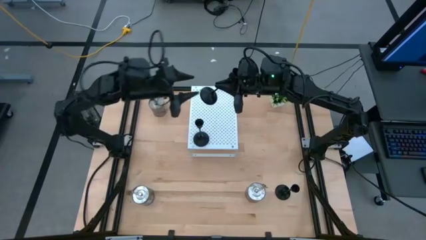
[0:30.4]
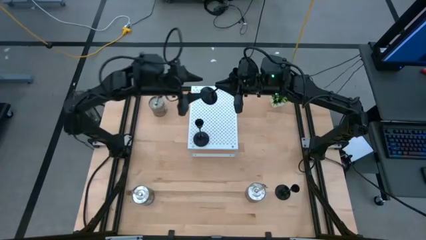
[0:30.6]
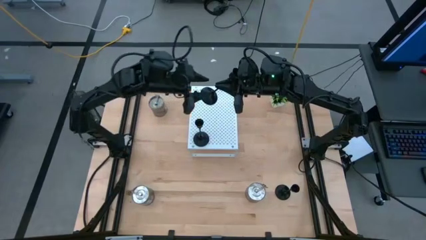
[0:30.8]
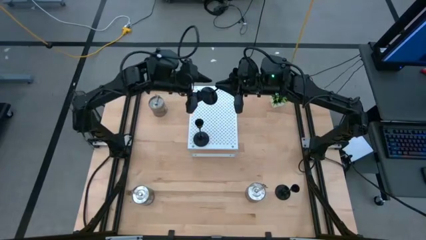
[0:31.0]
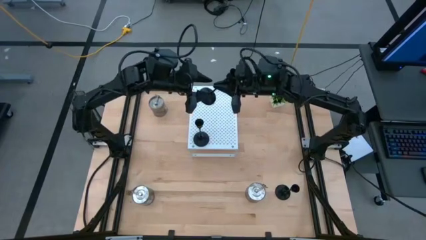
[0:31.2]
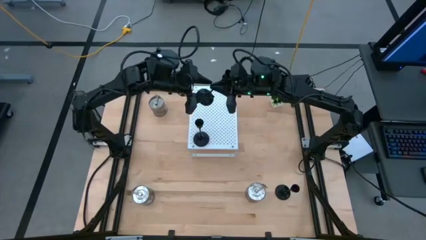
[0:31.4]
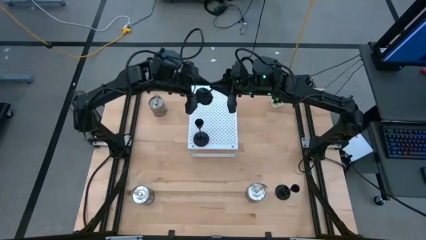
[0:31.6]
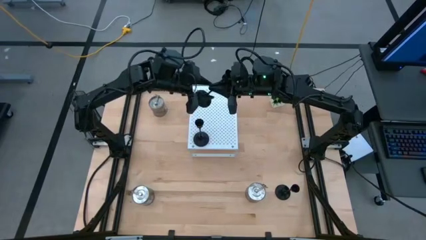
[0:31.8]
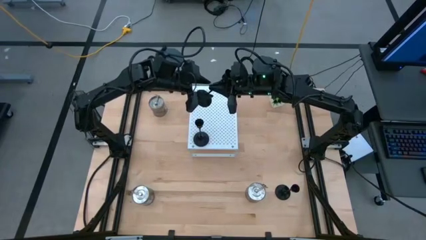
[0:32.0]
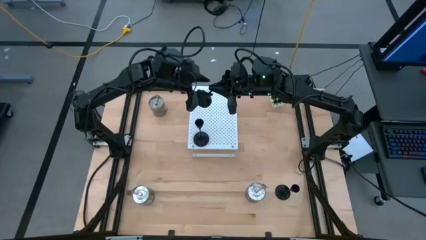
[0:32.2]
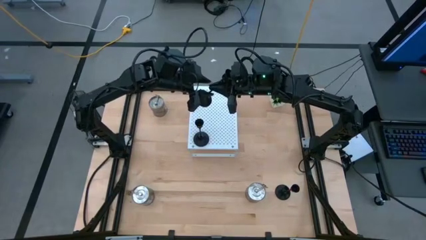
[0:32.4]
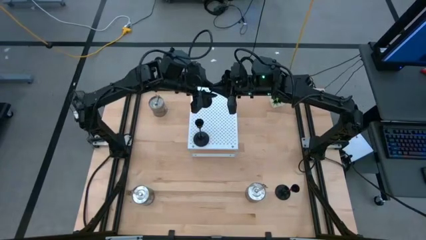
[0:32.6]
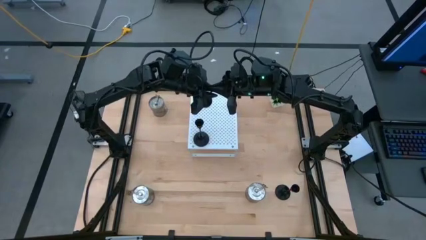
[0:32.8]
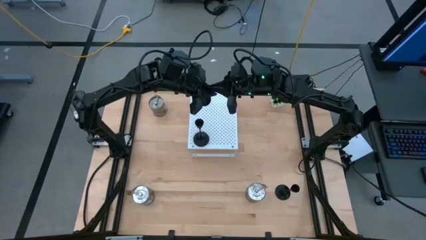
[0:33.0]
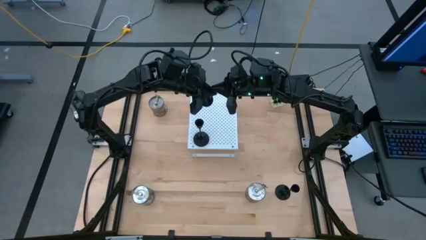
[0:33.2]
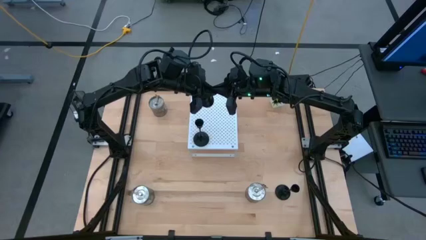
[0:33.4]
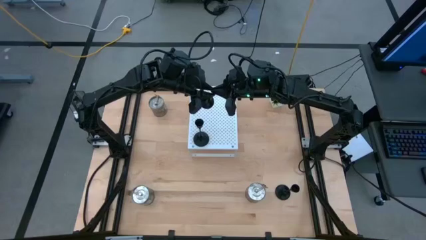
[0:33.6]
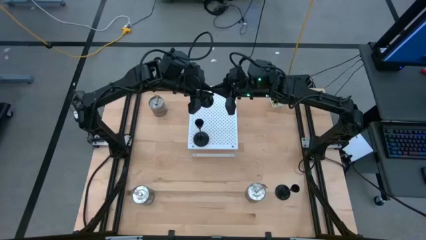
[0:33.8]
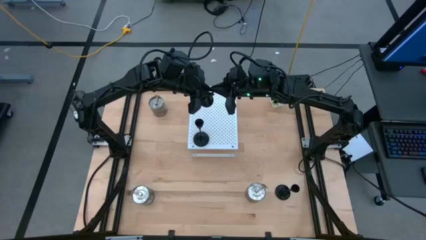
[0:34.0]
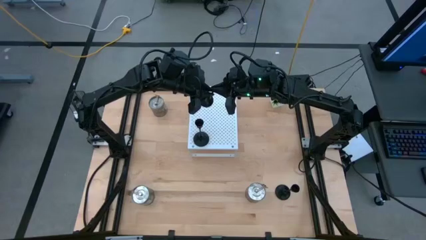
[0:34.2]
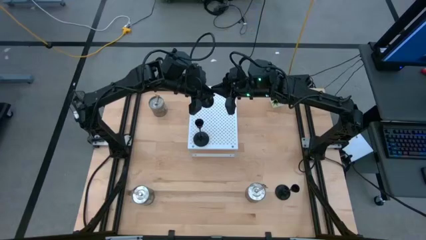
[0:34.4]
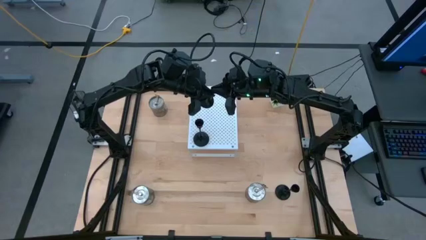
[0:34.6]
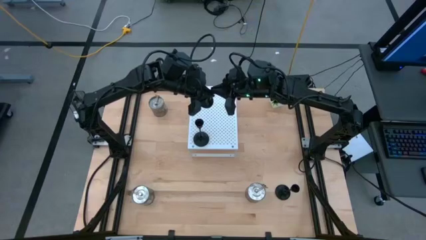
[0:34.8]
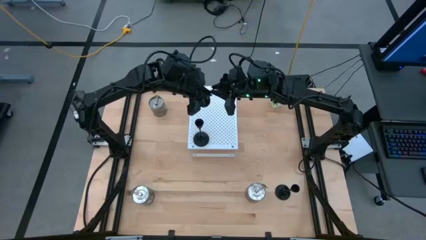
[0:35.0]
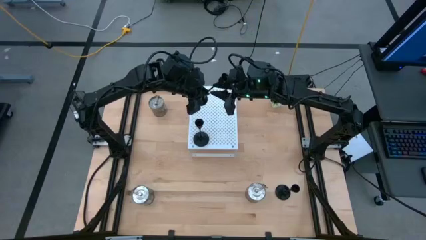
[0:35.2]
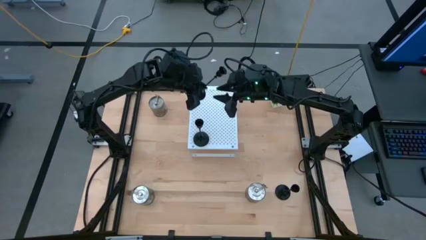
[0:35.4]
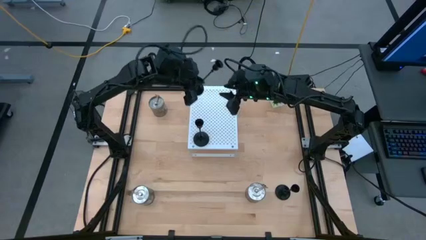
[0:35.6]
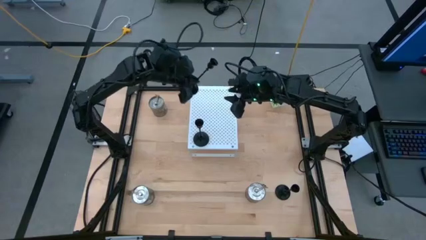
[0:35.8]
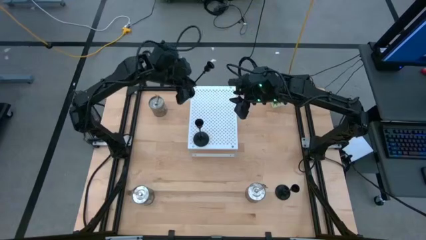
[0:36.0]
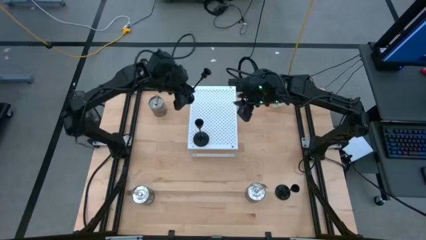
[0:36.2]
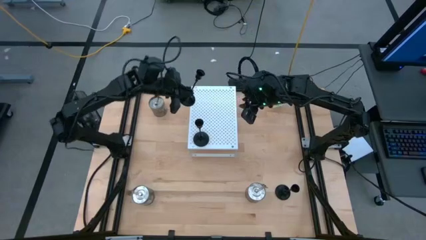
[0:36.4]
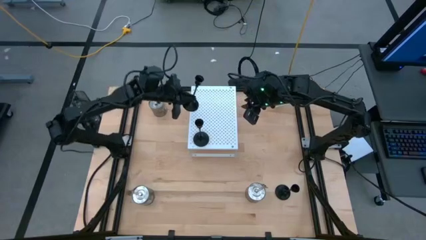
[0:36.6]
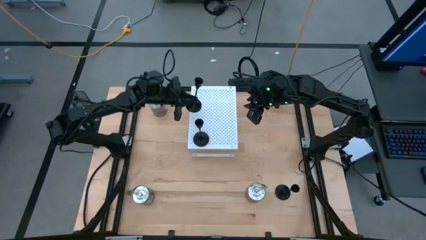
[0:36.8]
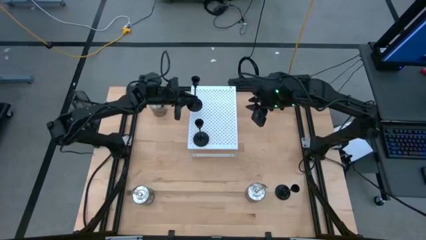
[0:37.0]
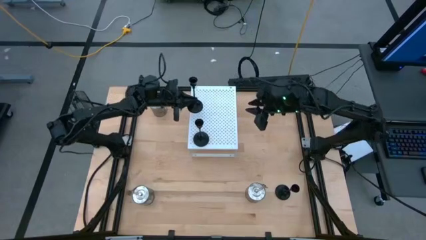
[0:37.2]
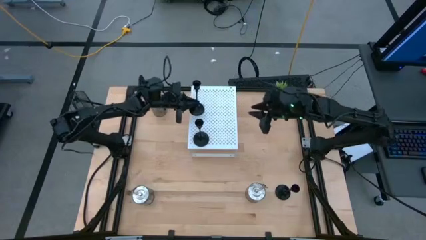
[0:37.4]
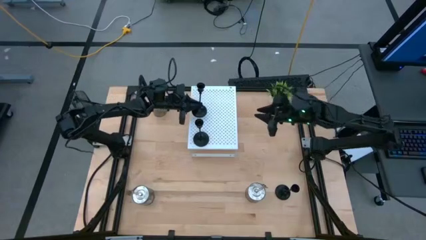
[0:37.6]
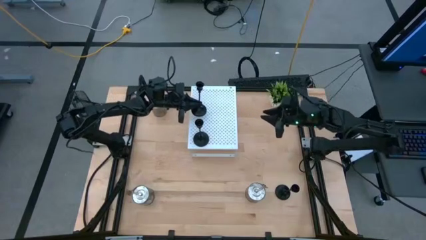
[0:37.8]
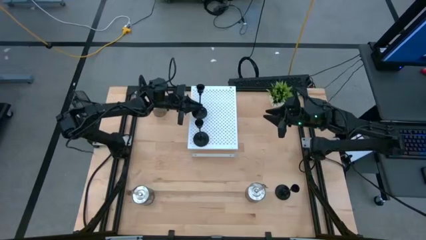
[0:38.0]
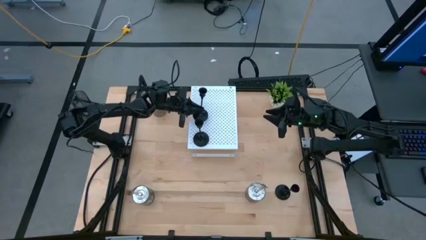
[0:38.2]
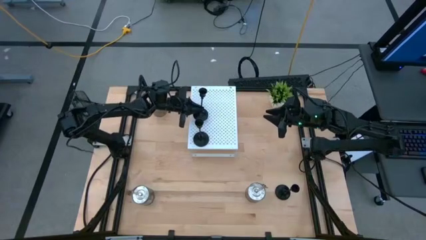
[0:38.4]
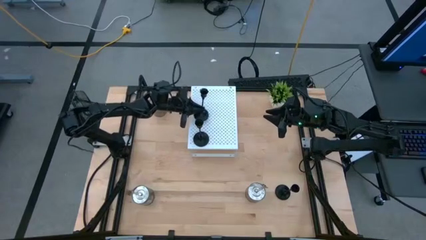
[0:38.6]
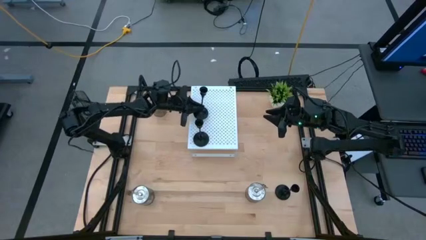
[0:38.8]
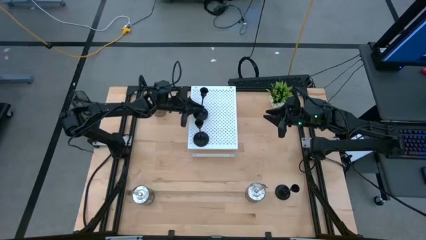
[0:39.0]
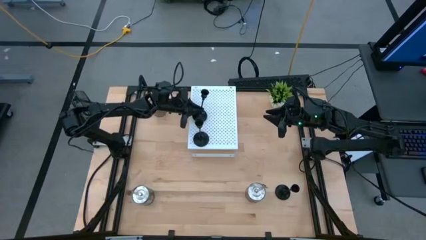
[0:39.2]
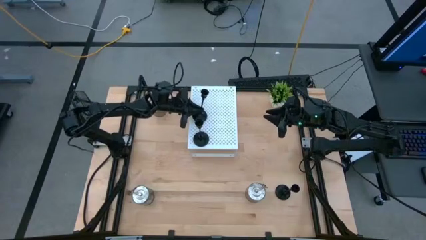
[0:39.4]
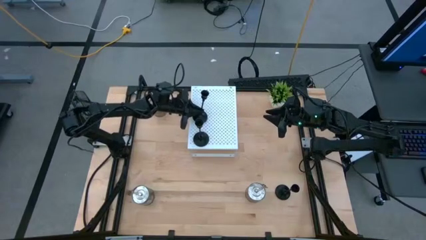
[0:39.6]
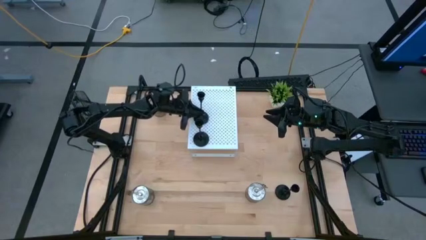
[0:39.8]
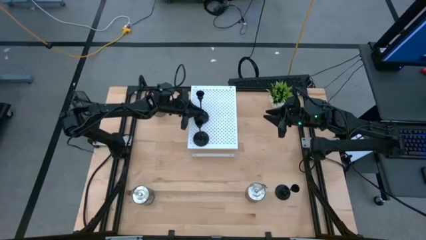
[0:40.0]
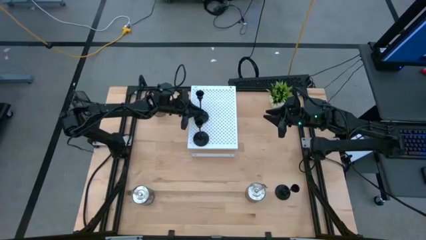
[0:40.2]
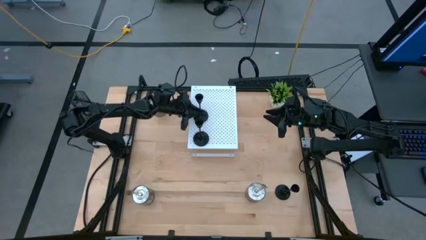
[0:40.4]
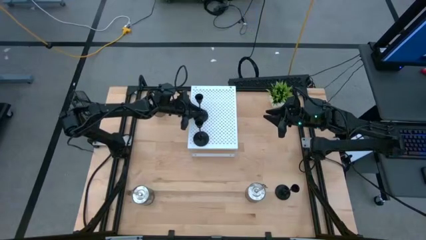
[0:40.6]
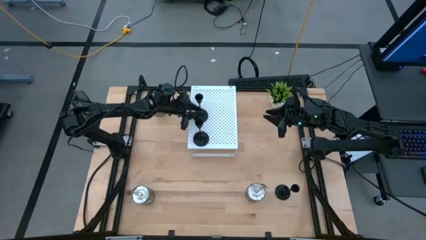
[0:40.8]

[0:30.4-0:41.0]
Task: Pick & Place candle stick holders
Put the top black candle holder on the shelf aligned with the other black candle holder
